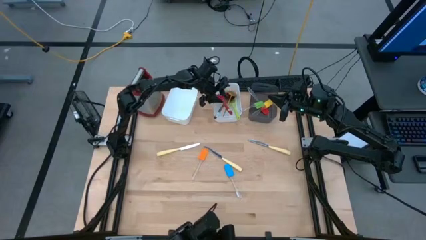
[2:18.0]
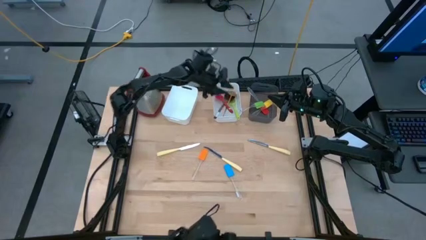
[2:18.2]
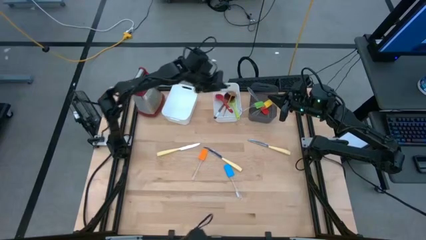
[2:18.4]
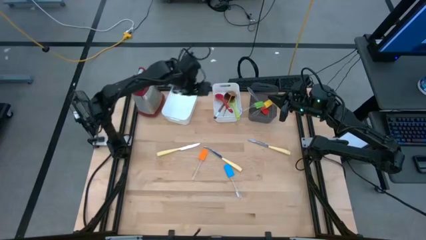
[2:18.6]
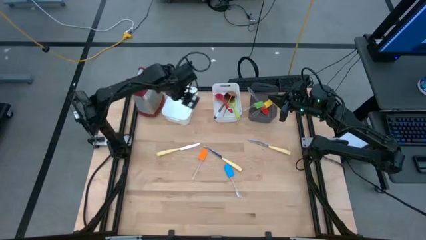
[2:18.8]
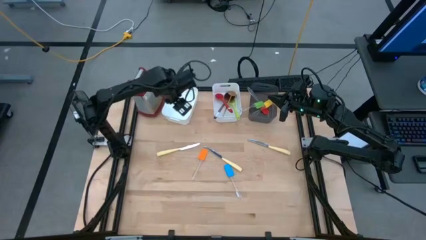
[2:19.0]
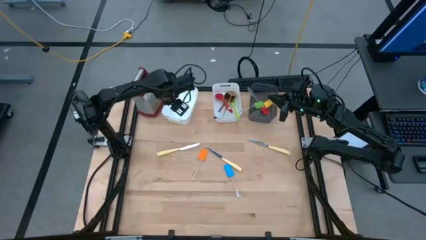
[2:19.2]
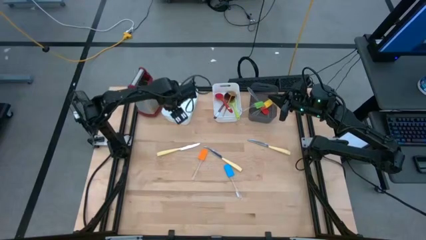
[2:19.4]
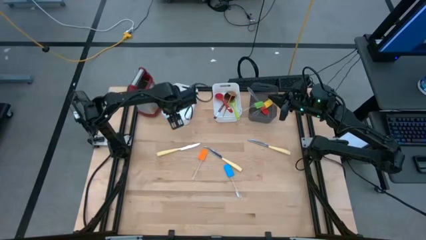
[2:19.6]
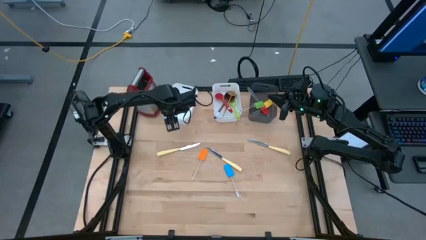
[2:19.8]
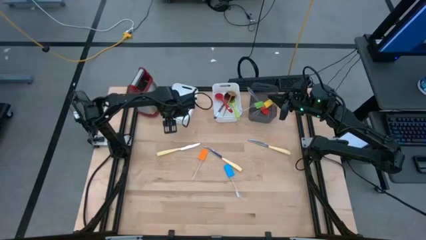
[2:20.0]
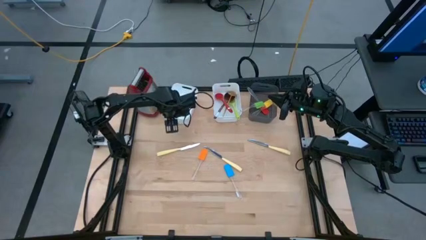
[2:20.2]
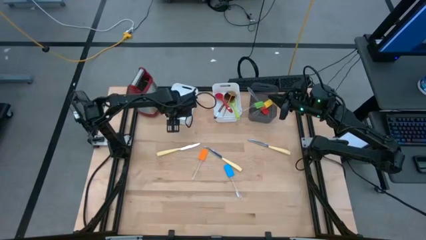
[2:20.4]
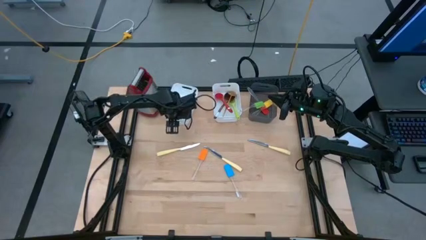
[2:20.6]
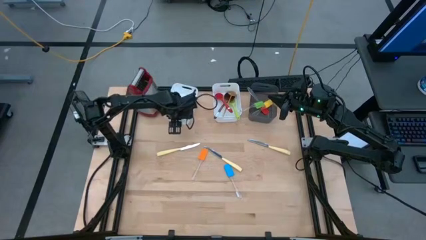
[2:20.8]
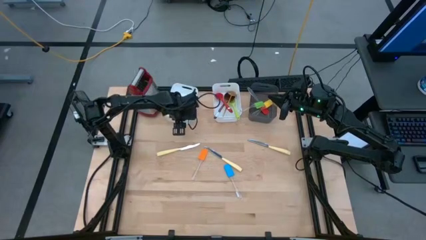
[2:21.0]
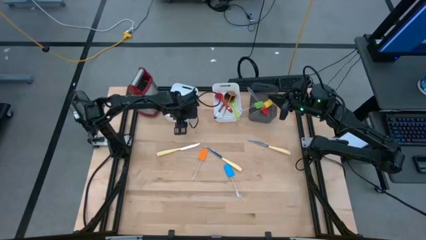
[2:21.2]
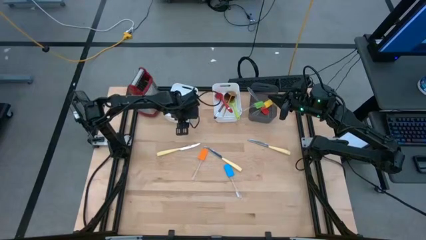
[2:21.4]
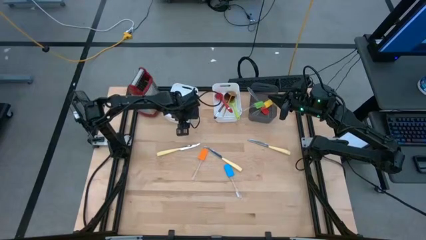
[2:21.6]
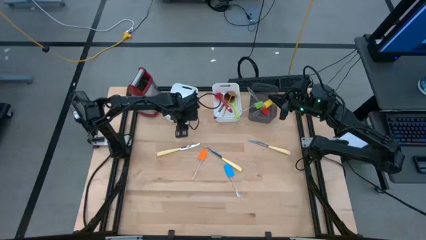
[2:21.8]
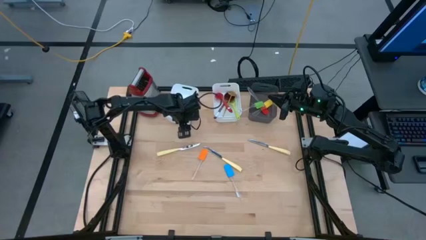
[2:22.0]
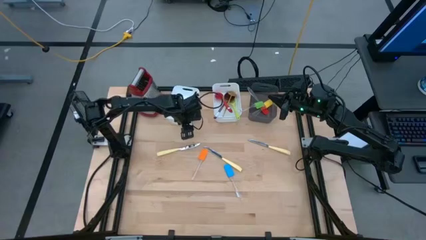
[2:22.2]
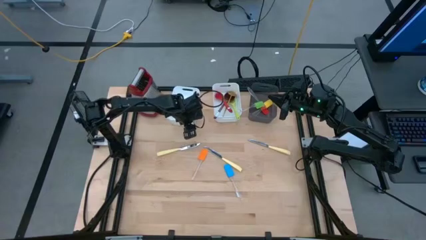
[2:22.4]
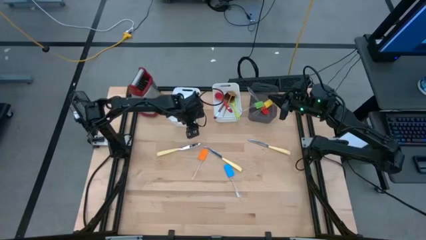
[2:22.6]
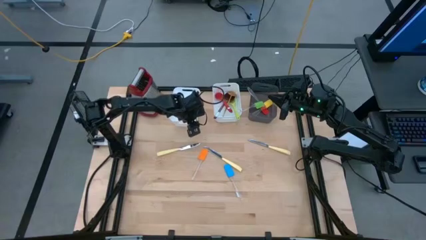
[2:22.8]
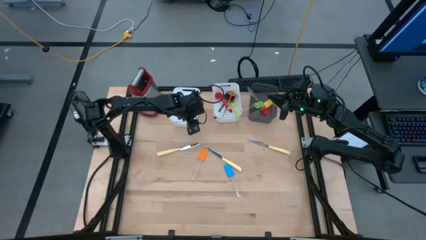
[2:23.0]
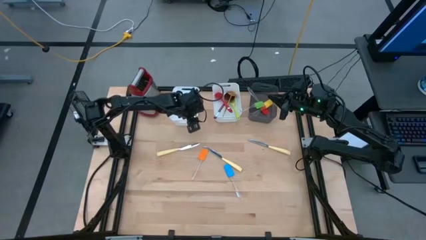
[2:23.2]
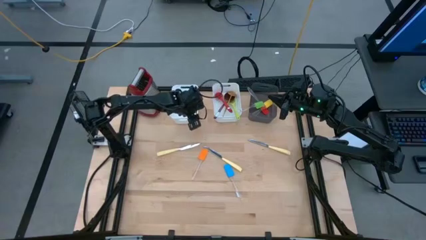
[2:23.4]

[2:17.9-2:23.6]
Task: Pick & Place Kitchen Items
Adjust the left white bin on the table

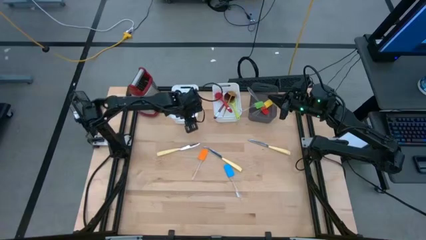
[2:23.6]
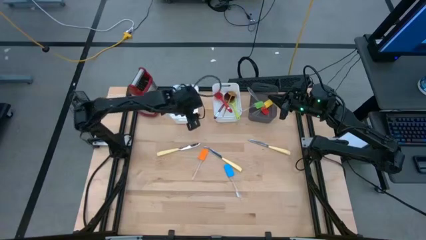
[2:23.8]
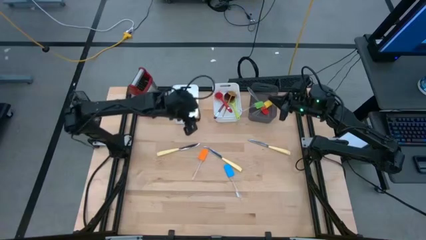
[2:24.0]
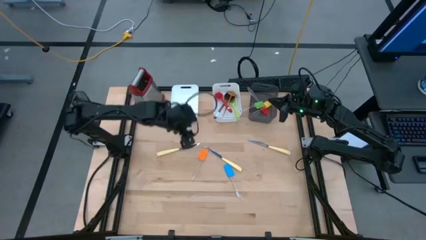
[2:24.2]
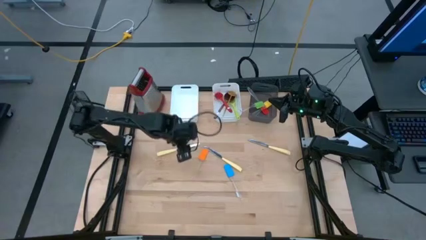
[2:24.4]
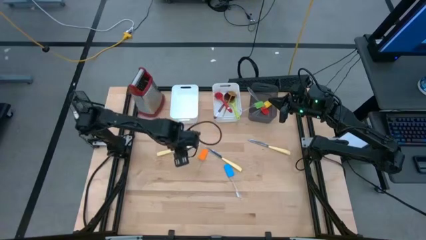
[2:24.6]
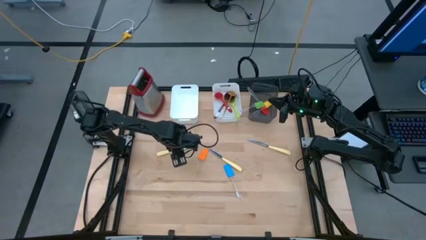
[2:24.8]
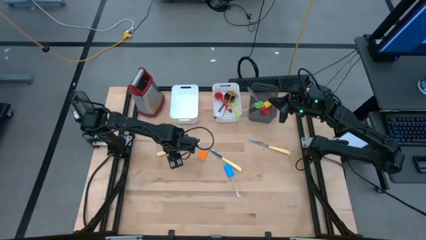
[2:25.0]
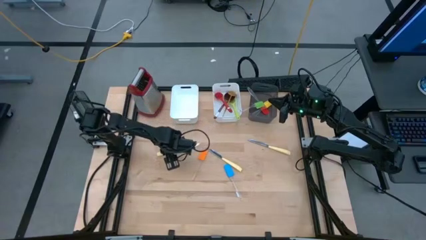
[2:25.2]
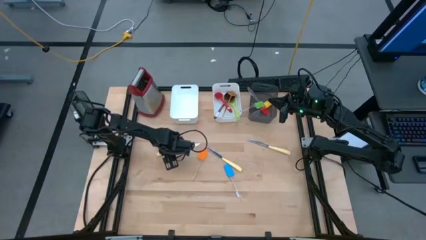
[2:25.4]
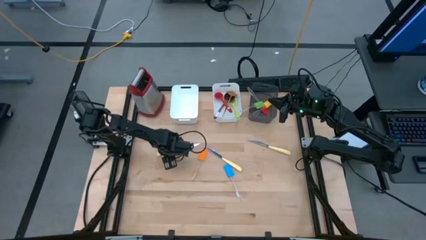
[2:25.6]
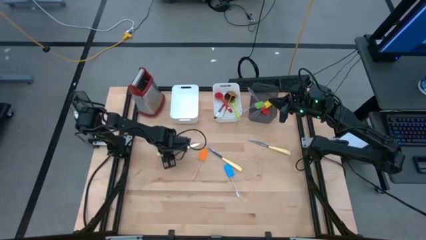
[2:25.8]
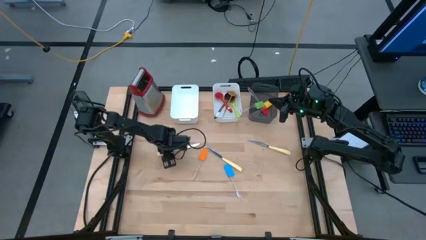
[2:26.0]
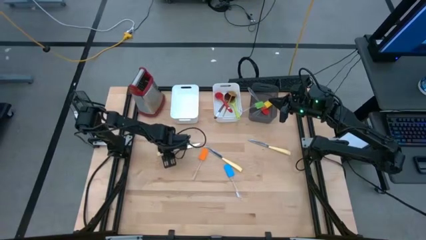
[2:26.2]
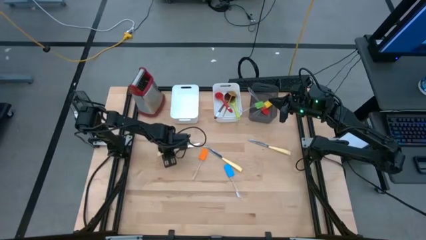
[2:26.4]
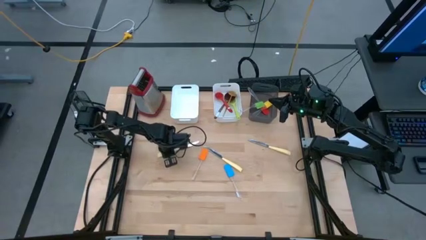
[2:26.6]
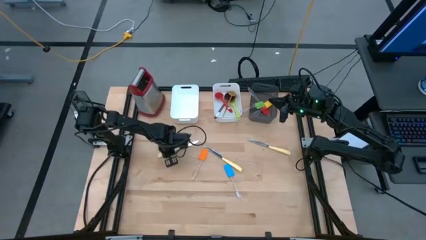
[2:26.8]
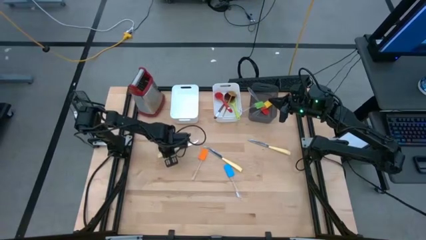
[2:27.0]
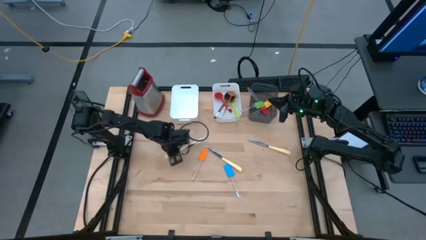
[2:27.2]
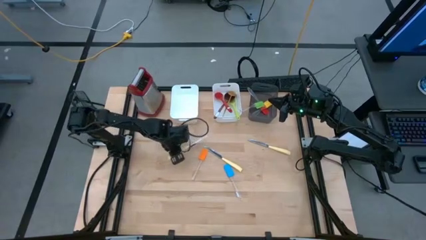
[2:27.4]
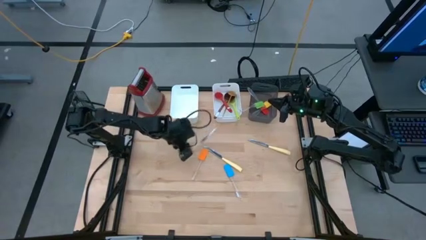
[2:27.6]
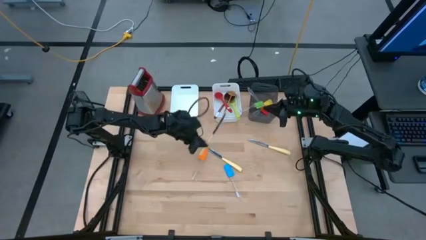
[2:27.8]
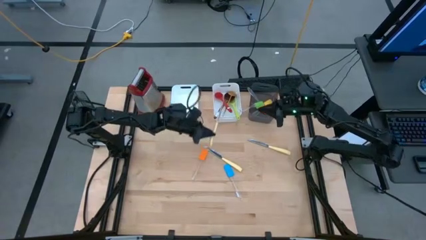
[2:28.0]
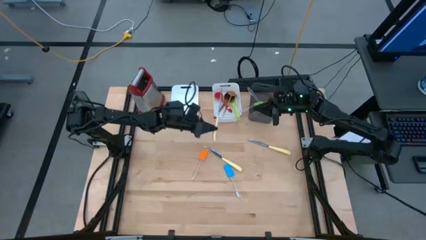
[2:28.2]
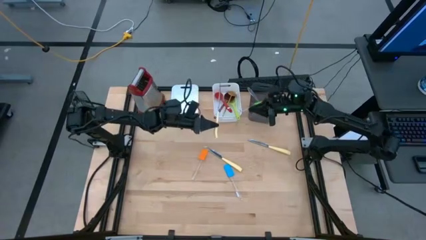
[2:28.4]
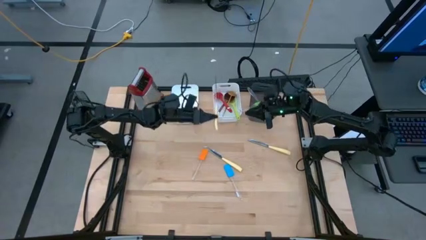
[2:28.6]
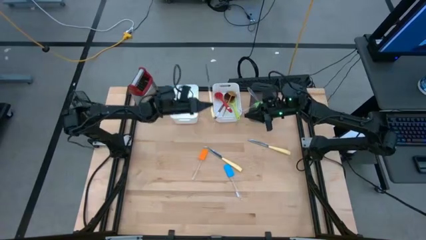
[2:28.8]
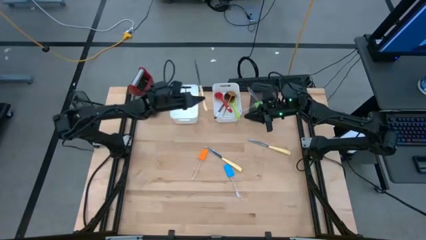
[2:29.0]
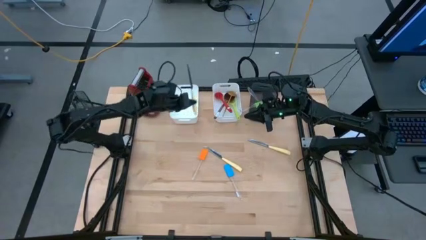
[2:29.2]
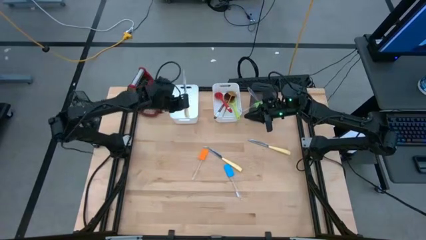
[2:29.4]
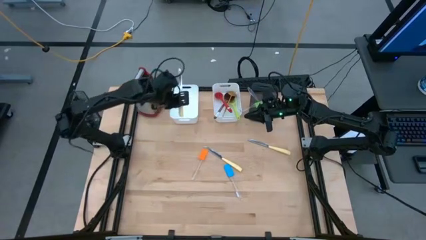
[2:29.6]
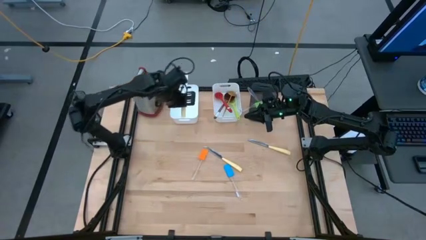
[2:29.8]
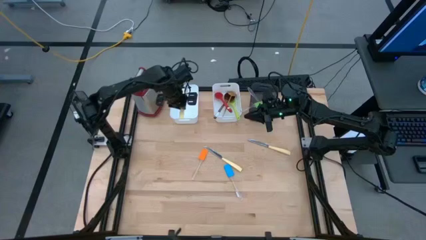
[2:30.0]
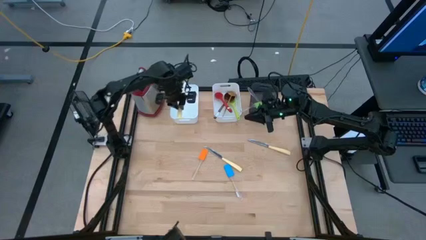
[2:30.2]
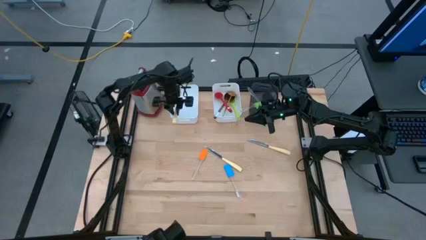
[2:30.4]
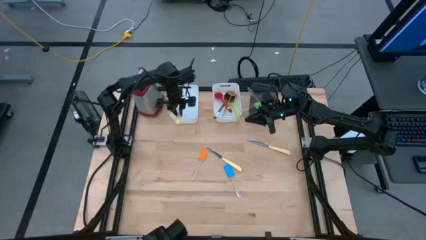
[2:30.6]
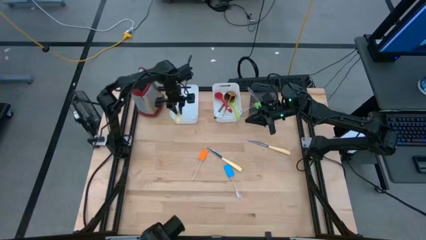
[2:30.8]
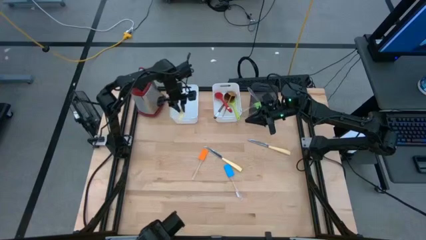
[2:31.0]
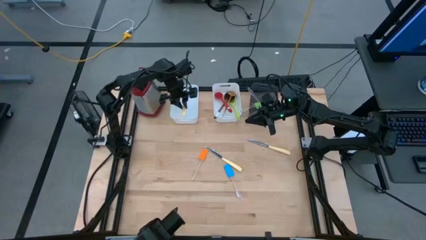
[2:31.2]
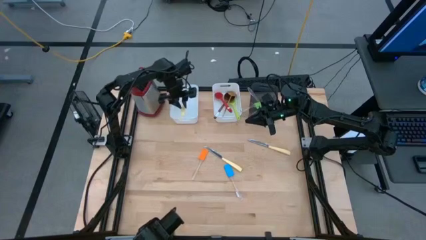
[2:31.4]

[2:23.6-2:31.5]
Put the left yellow knife into the left white bin
